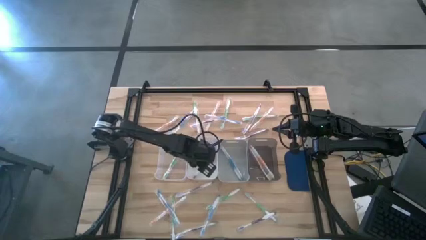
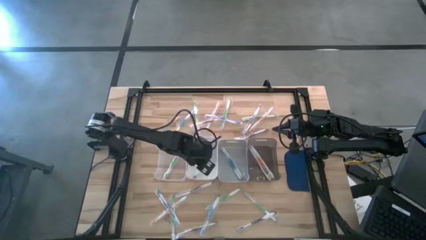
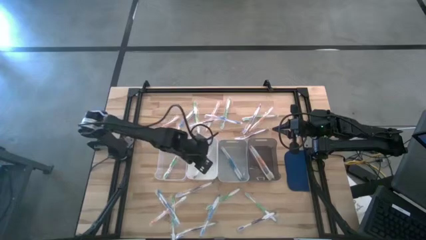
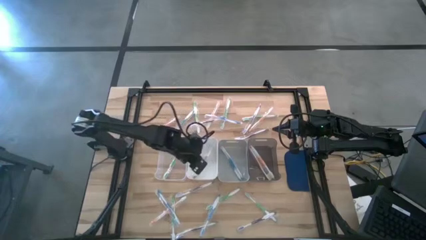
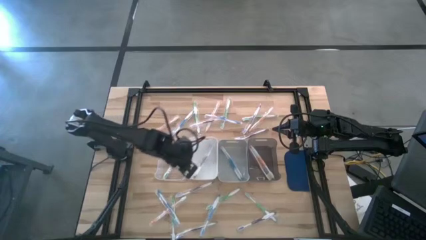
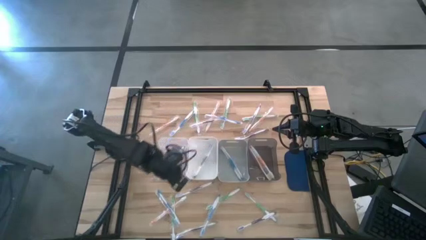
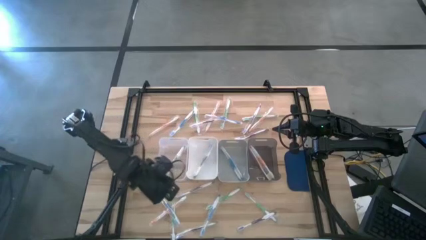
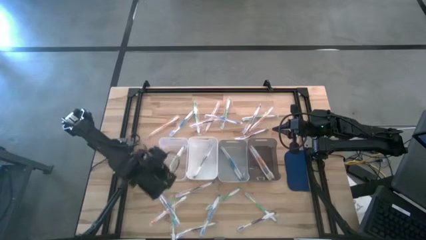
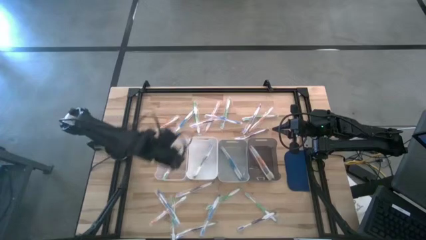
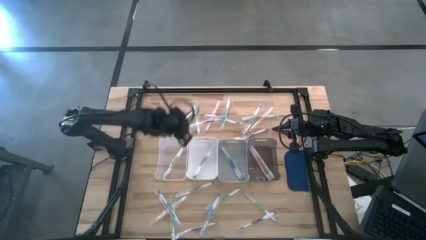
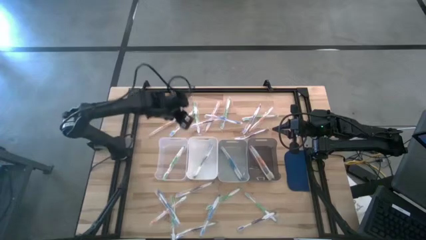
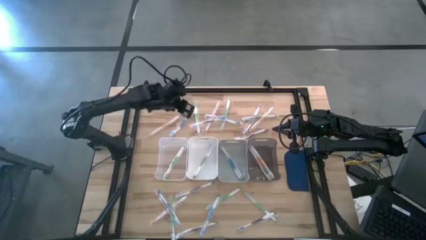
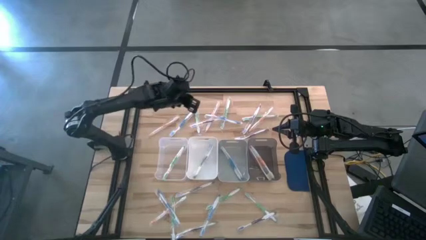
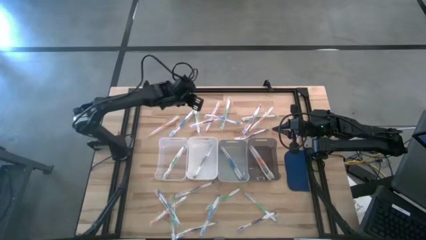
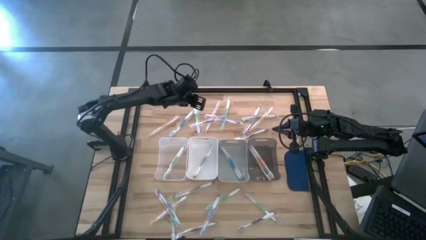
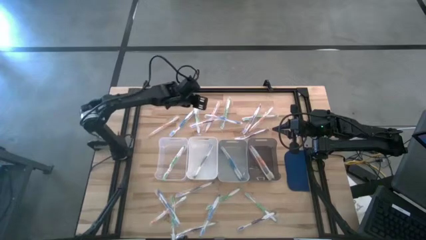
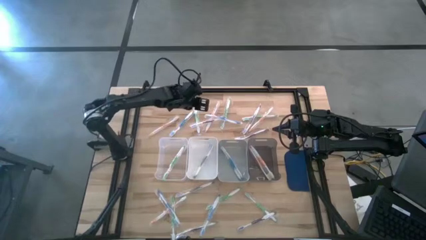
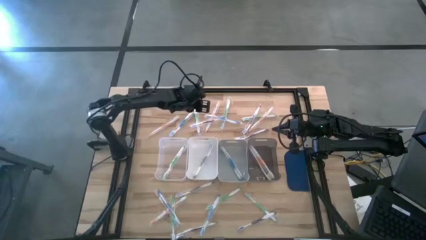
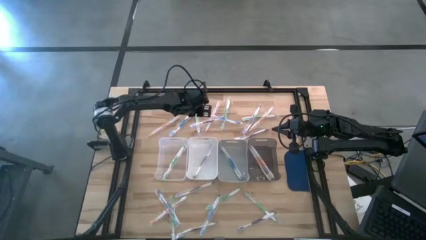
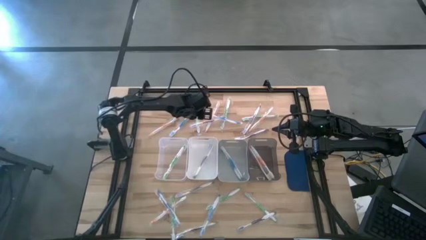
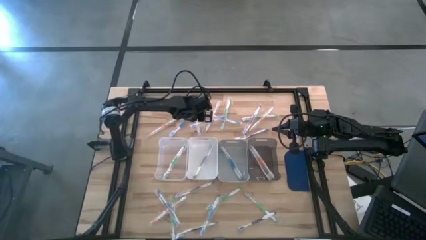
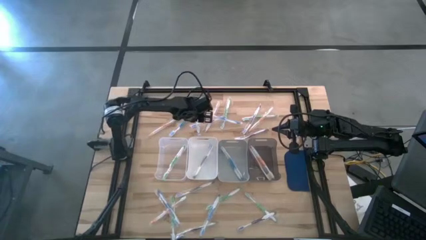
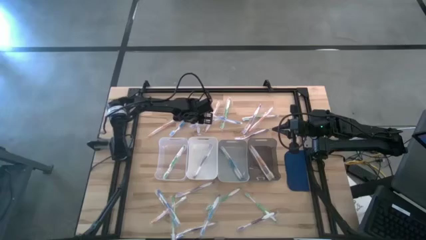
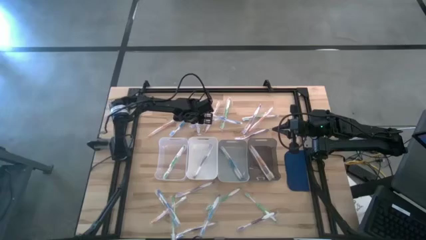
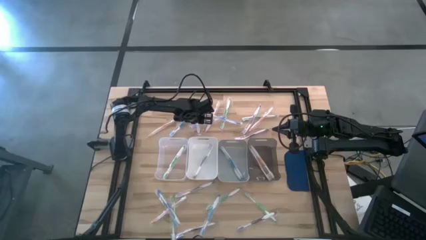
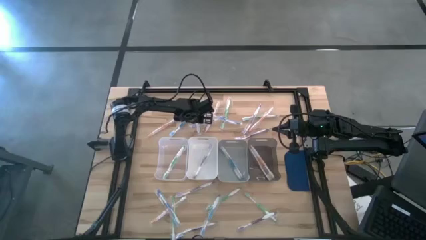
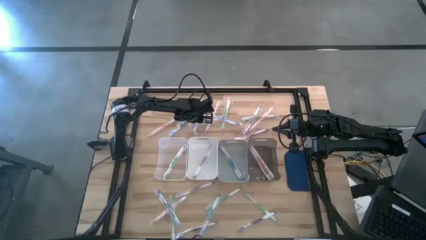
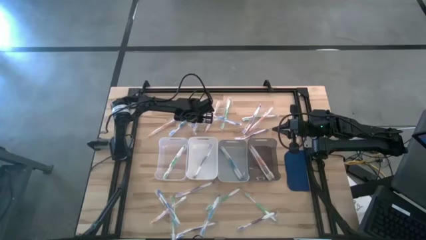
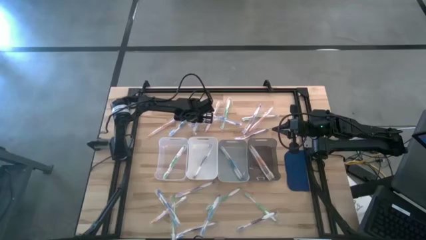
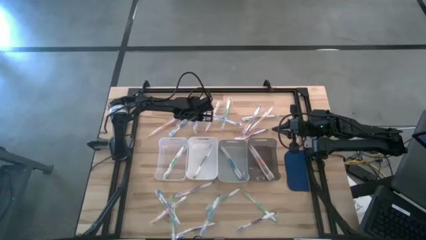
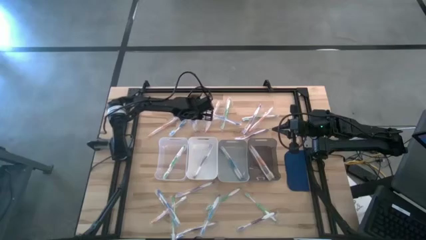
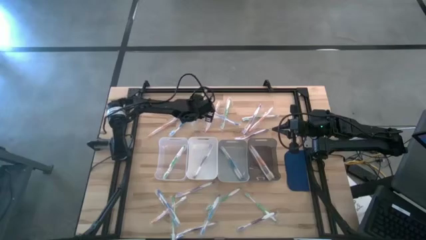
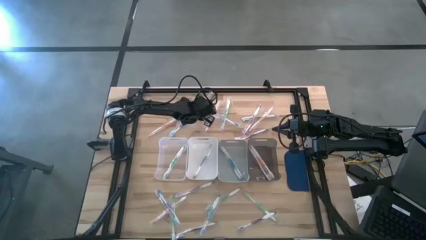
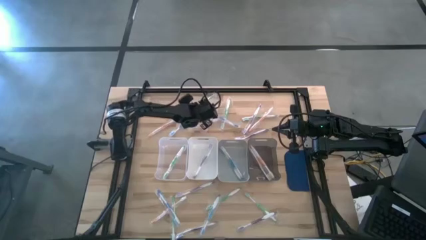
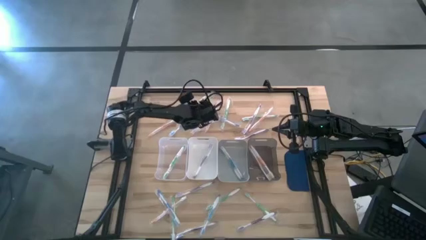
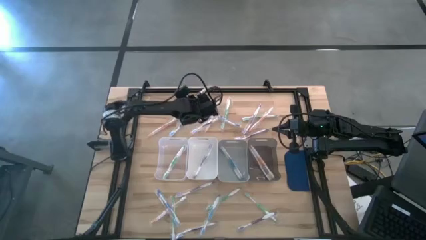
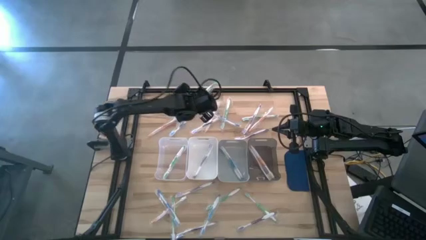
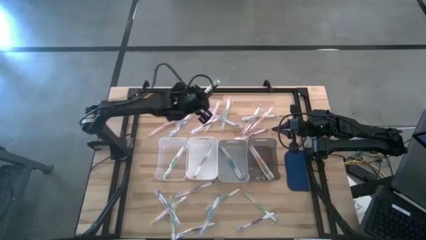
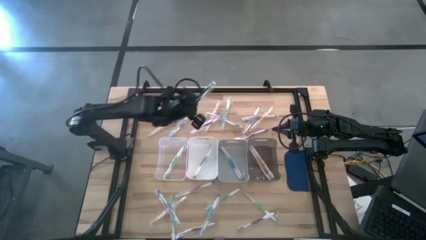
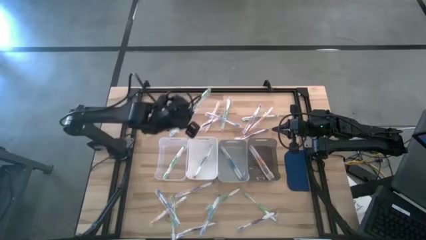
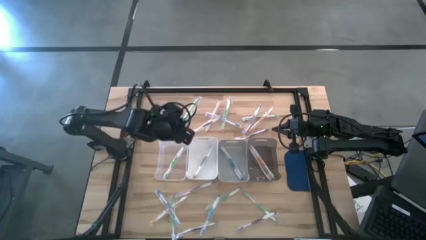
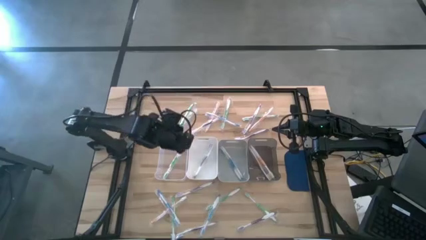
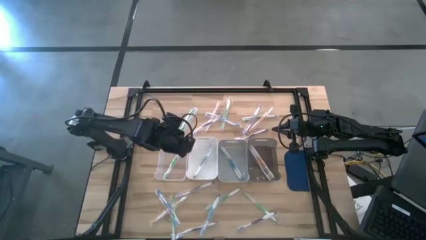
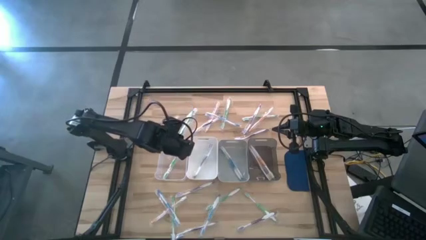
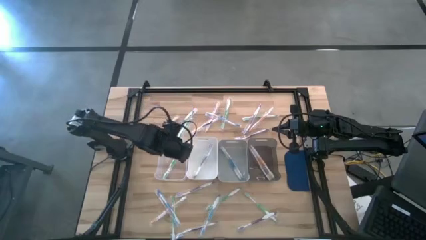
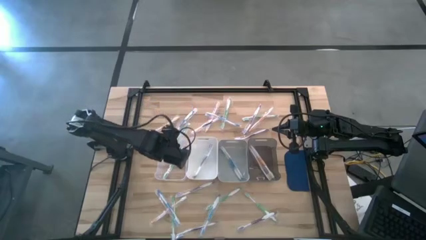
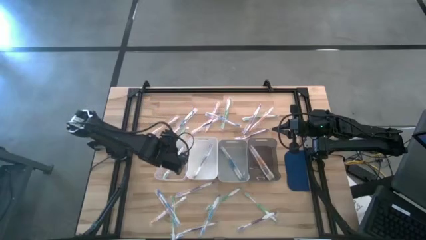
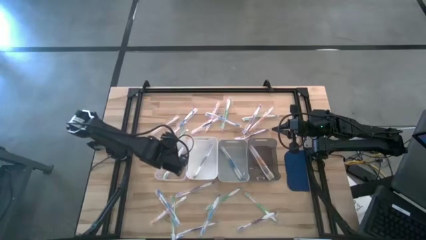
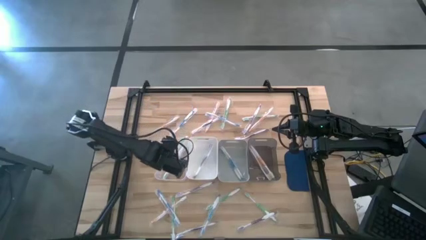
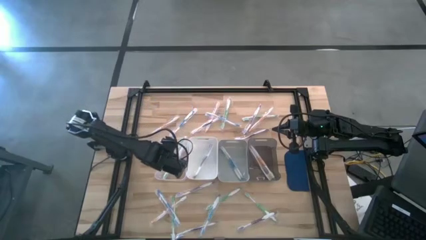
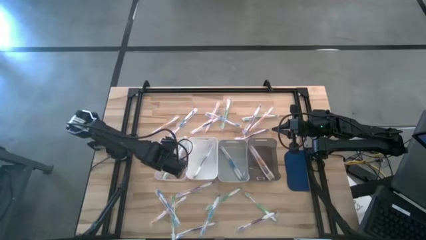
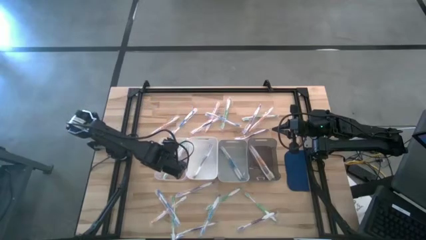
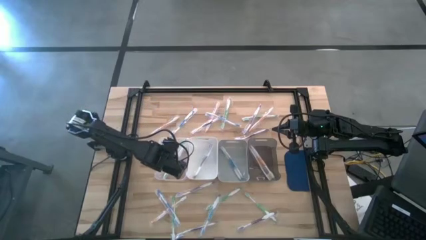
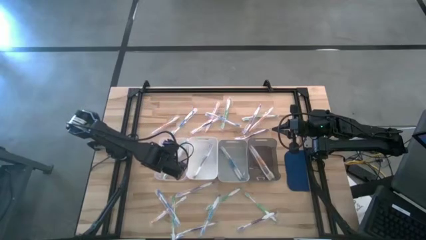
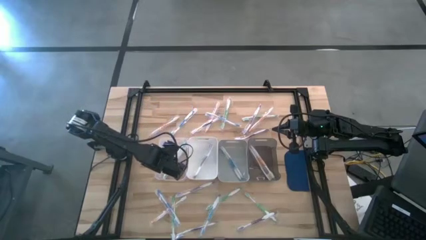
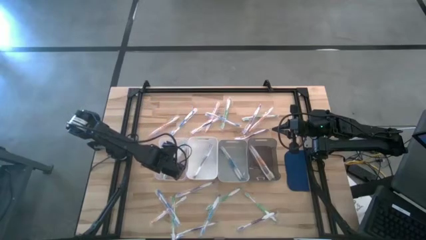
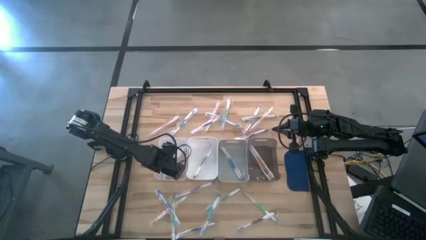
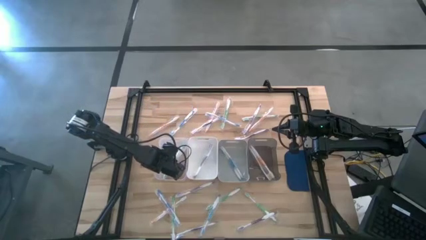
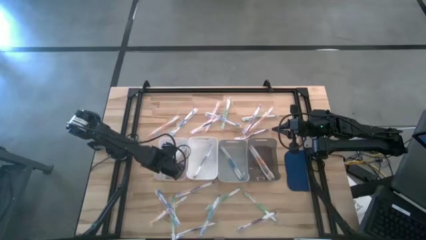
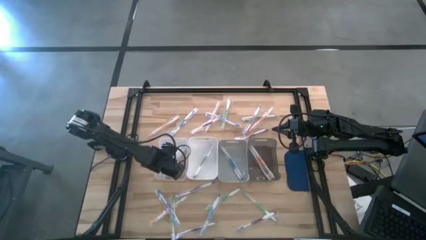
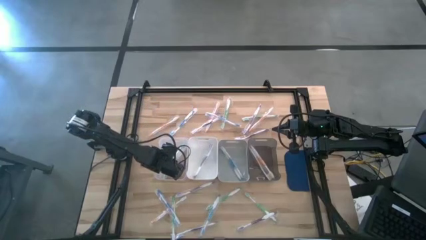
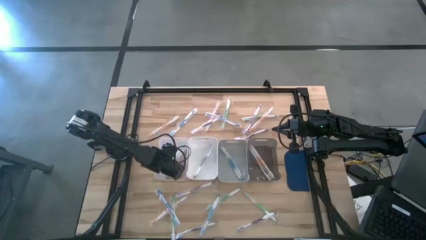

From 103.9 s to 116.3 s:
Task: Pick & Place Toothbrushes
Put the green toothbrush into the transparent bin
